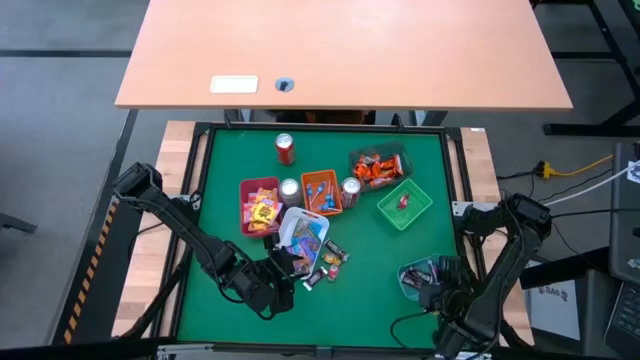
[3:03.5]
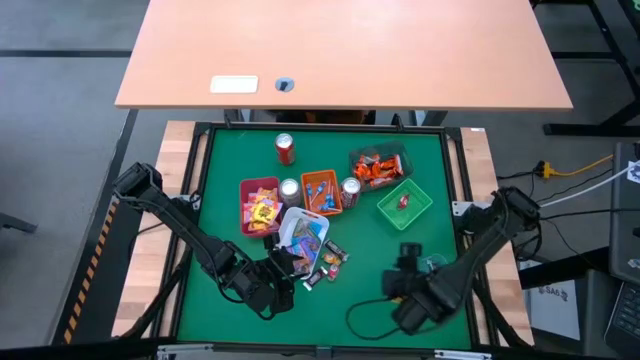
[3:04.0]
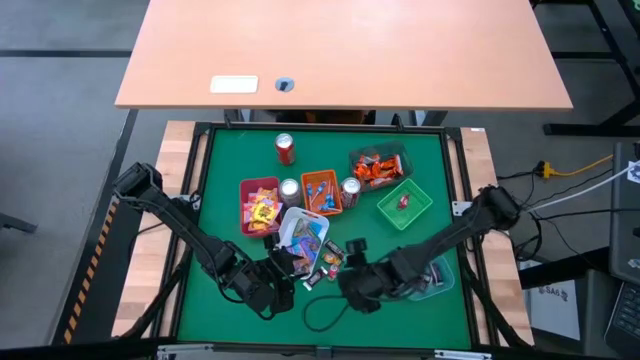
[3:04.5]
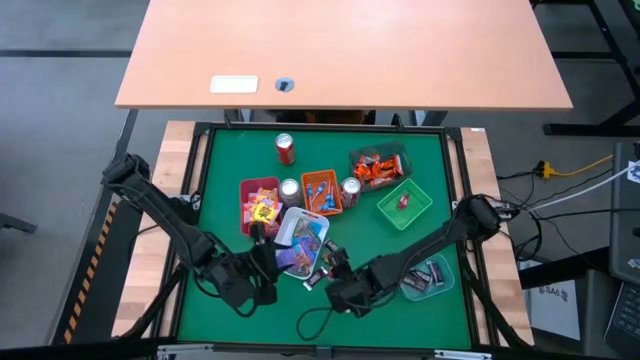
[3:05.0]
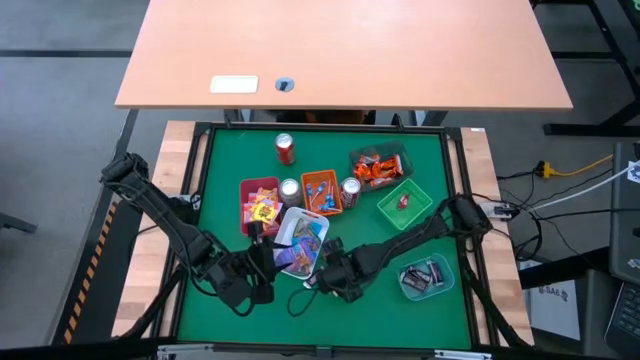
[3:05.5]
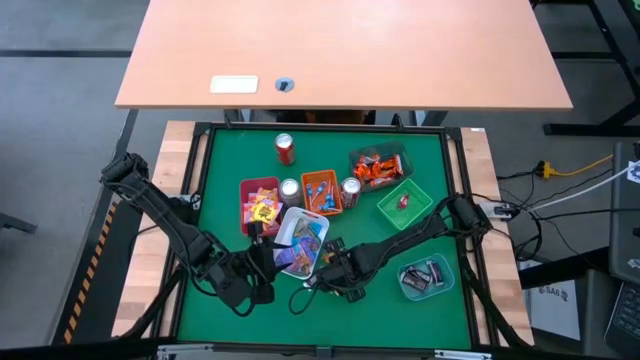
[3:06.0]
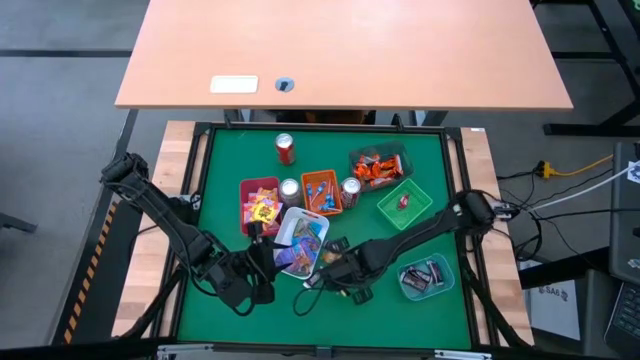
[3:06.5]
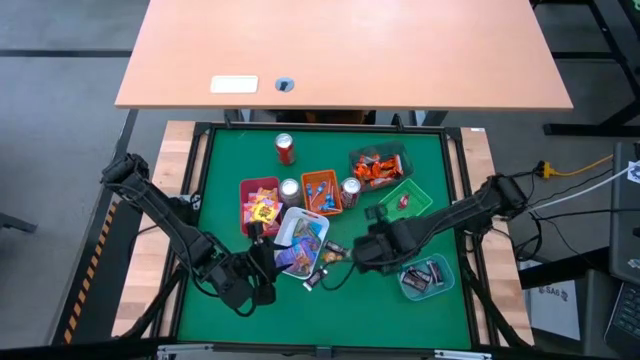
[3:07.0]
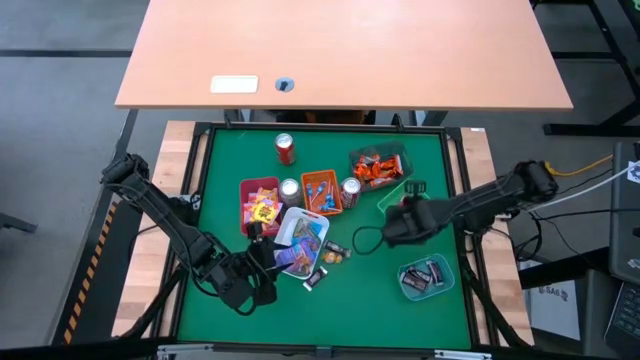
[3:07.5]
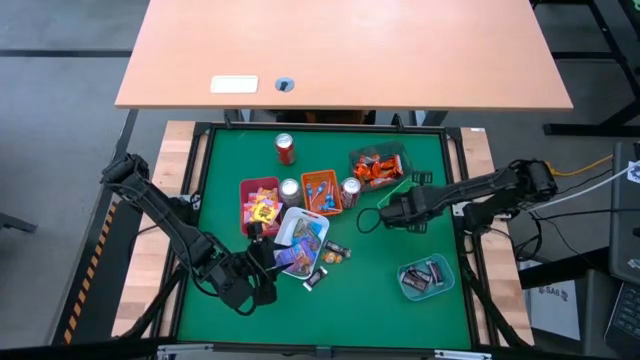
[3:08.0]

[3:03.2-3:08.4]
Task: Sort candy
Put the red chocolate into the blue bin

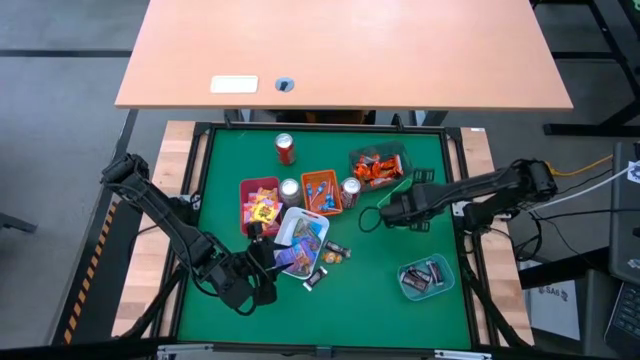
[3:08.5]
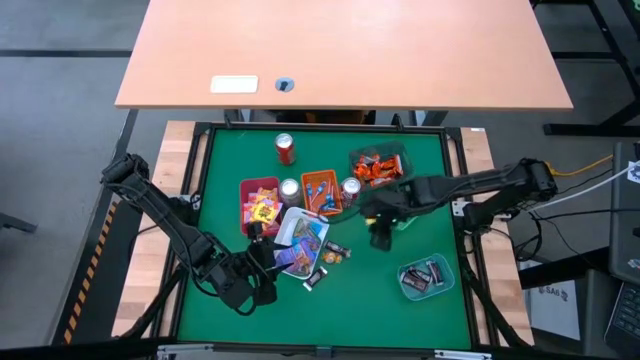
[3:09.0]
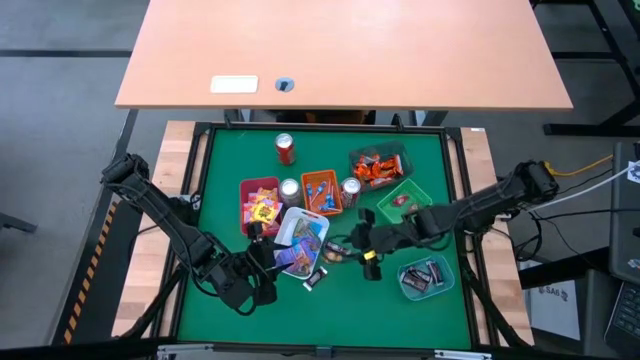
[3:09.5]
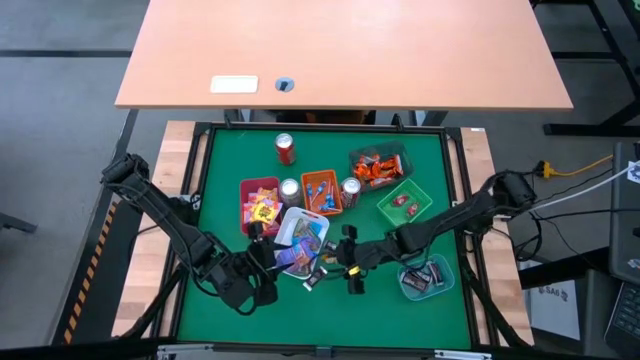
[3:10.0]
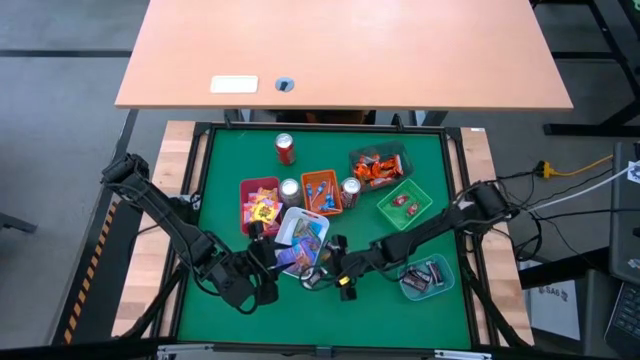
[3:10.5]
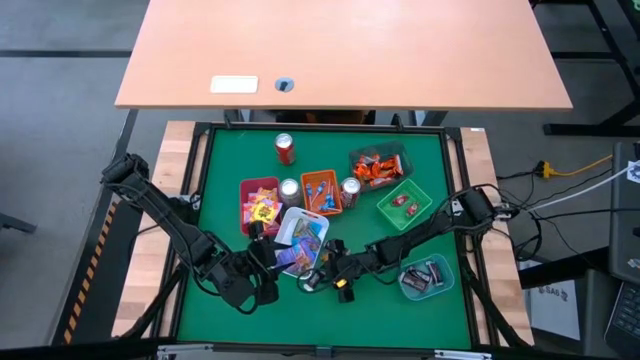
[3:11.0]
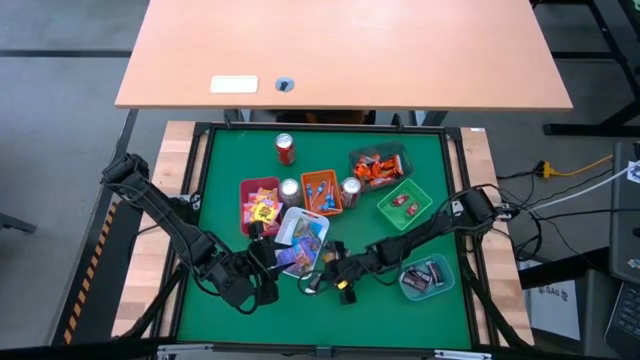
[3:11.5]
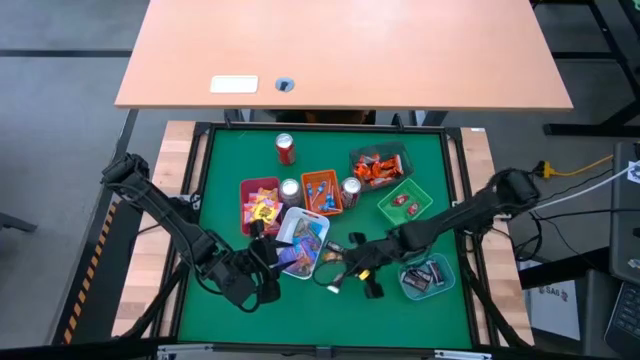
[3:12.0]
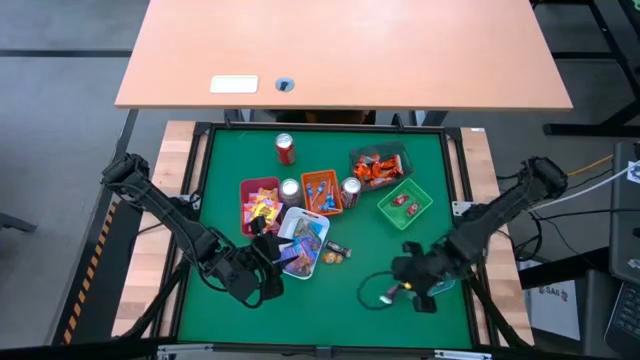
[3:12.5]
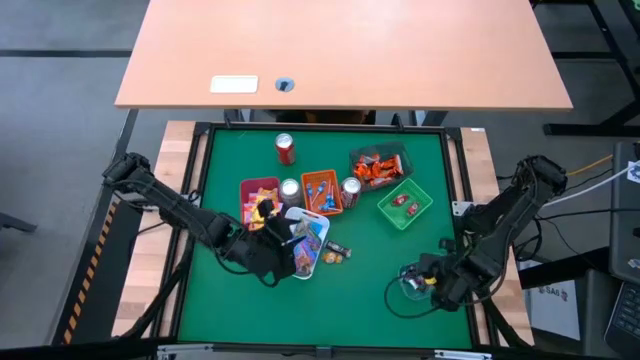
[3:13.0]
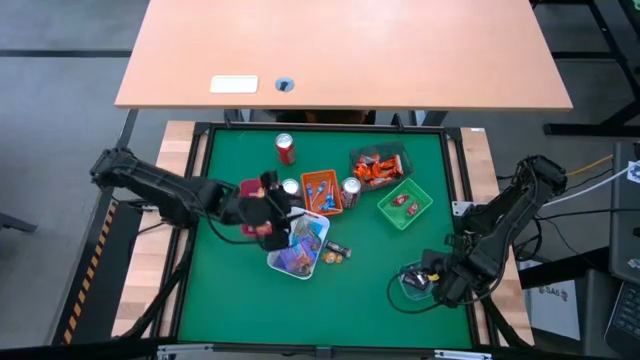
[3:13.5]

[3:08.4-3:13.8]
Put the brown chocolate into the blue bin

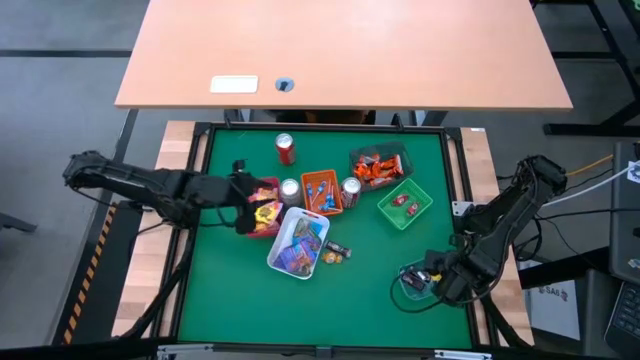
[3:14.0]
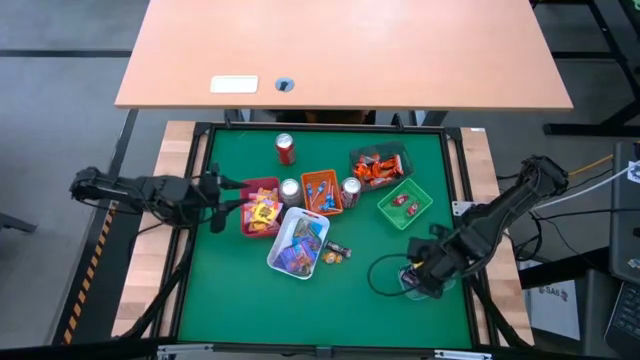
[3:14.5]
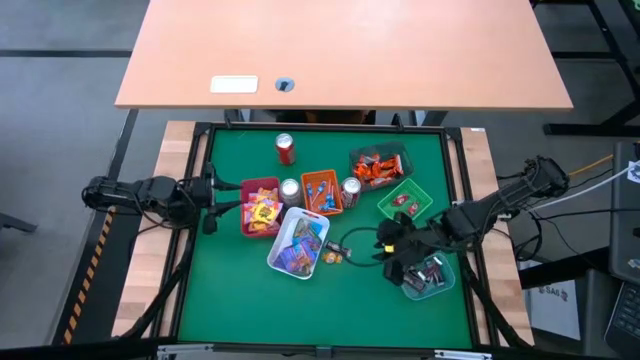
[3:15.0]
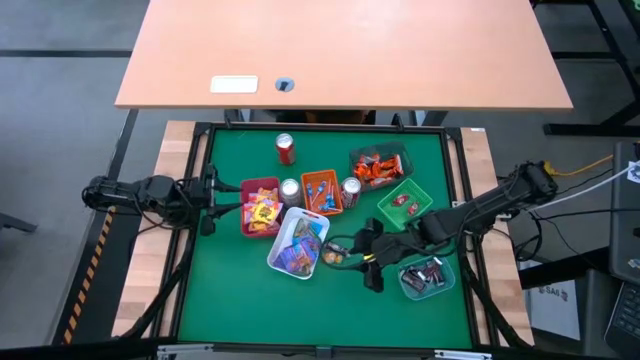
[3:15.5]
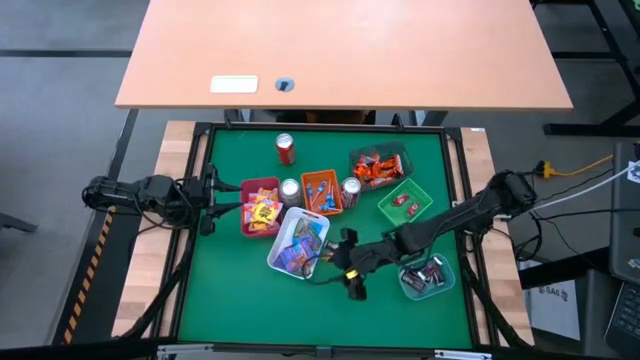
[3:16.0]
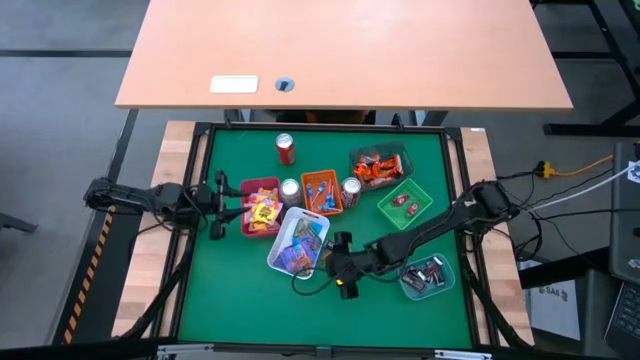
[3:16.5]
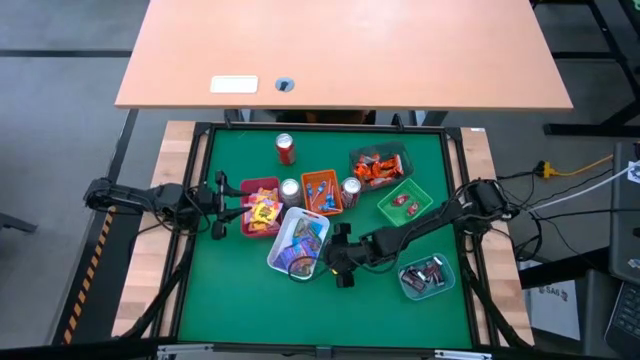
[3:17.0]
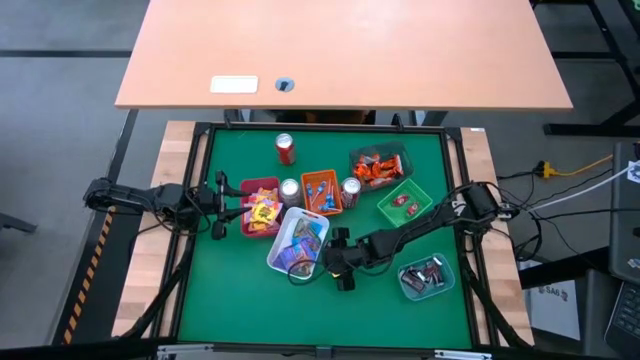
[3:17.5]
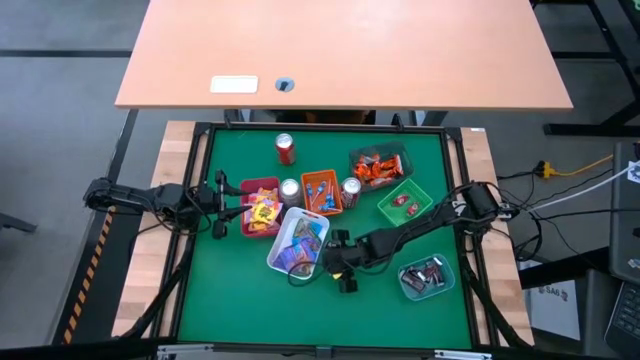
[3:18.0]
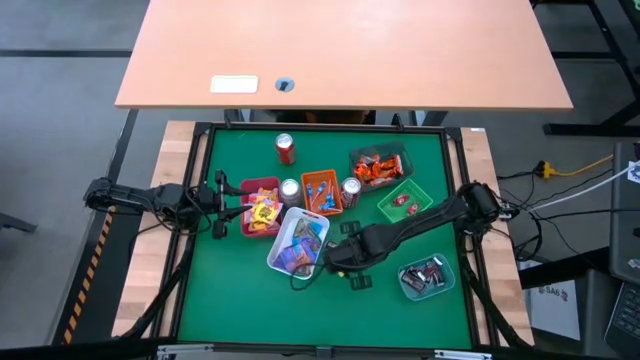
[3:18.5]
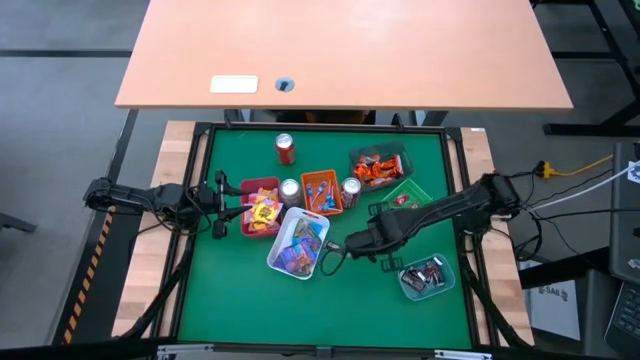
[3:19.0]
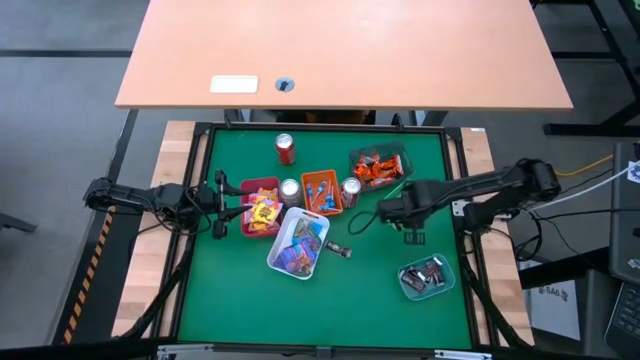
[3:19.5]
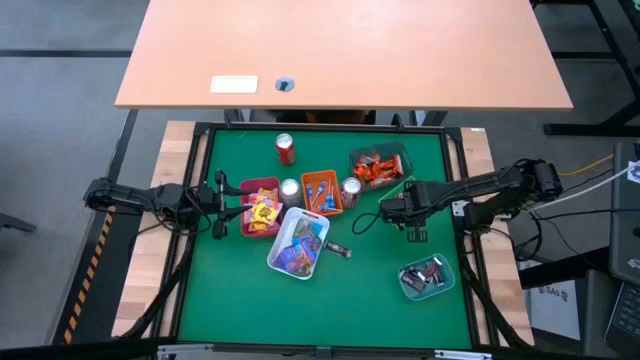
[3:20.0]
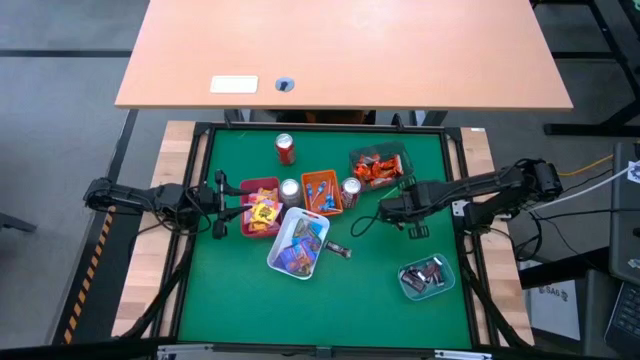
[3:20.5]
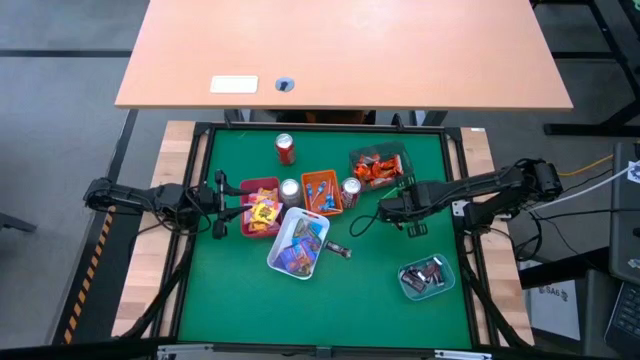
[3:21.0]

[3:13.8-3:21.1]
Put the yellow chocolate into the green bin

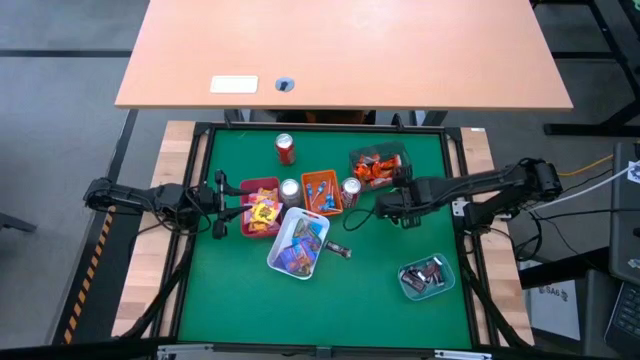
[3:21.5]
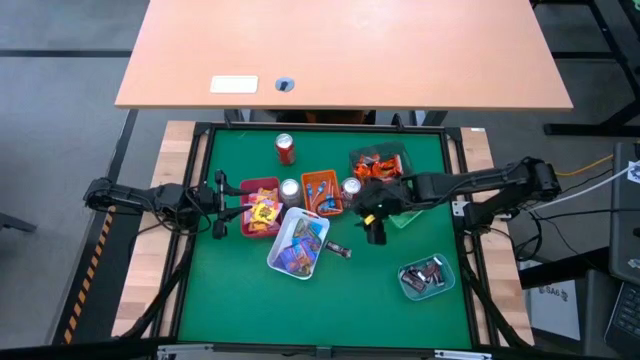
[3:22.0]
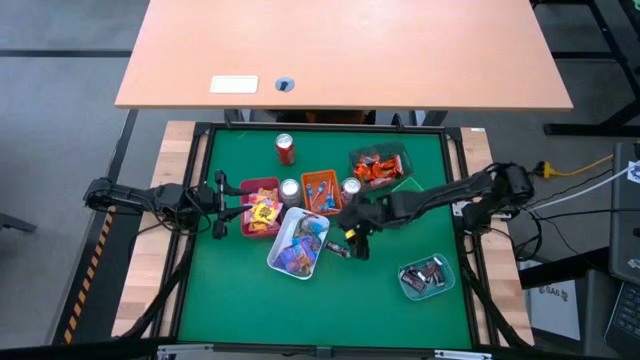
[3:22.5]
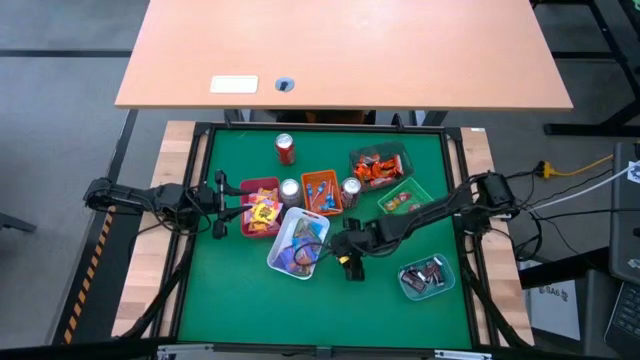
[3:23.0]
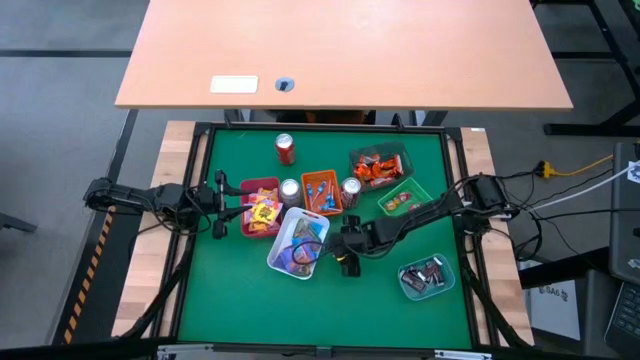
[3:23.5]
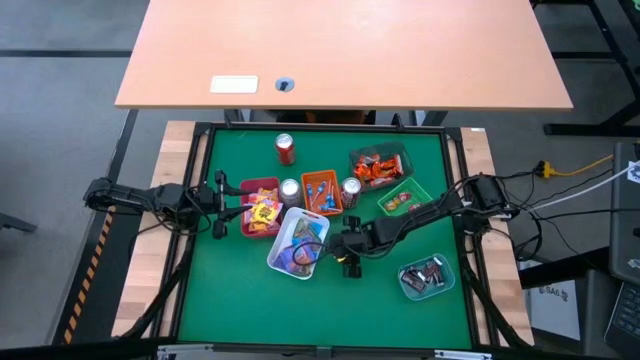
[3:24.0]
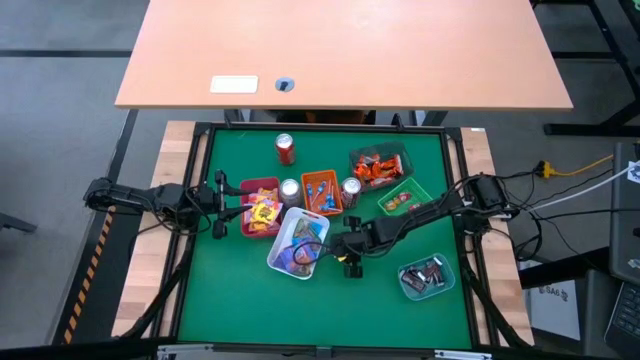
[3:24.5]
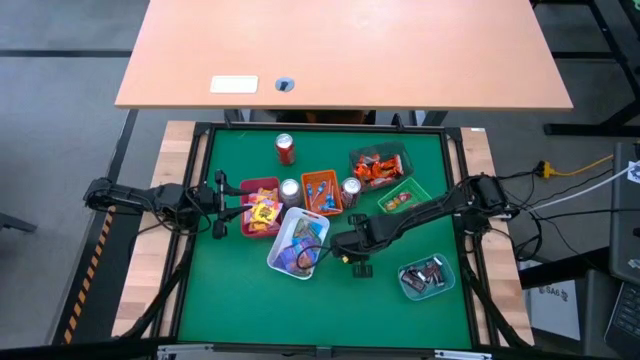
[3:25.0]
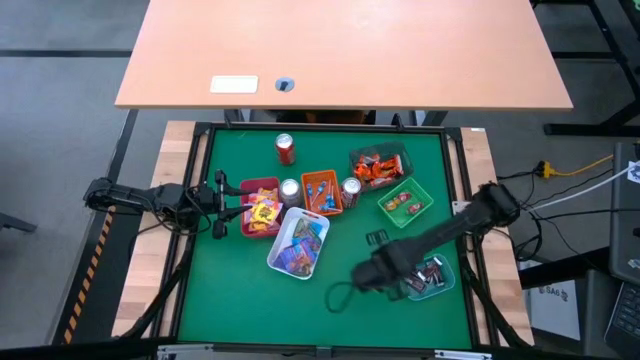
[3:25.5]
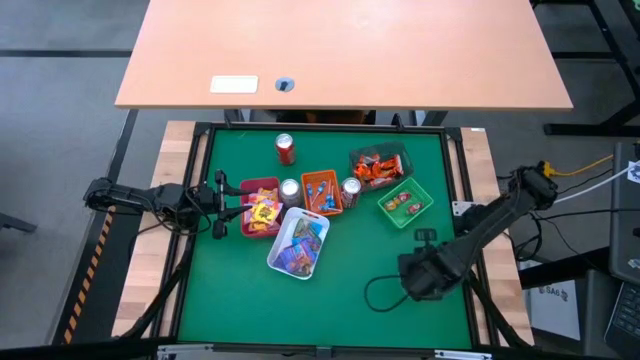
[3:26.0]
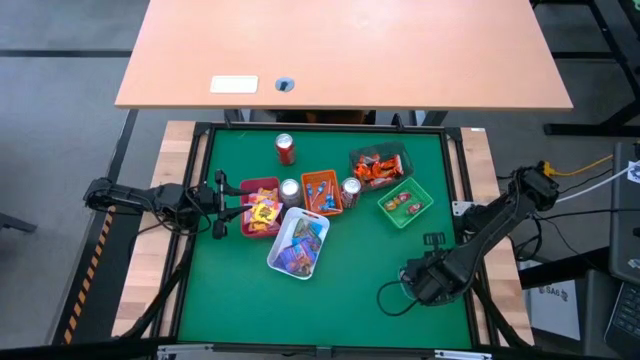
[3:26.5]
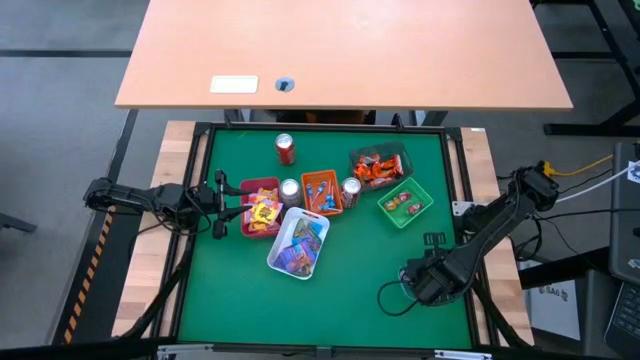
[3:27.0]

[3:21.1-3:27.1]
Put the brown chocolate into the blue bin
